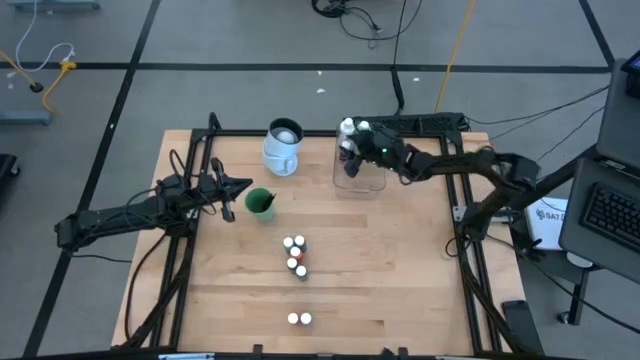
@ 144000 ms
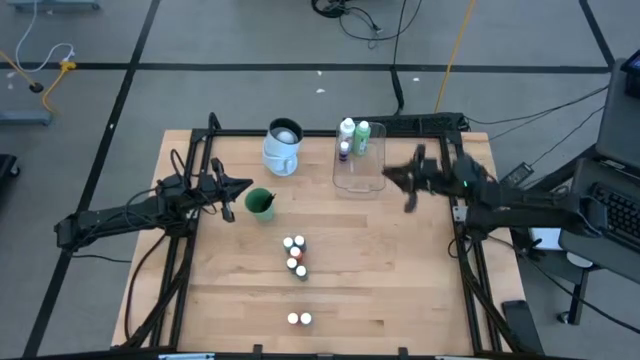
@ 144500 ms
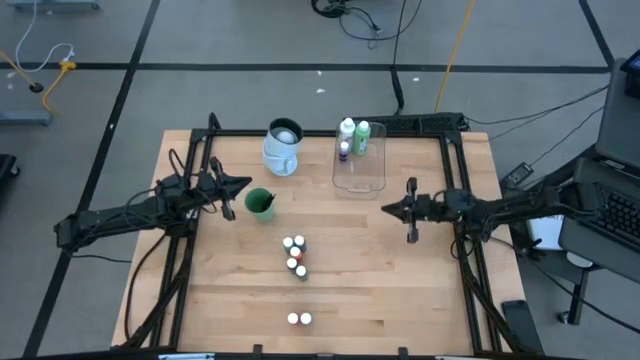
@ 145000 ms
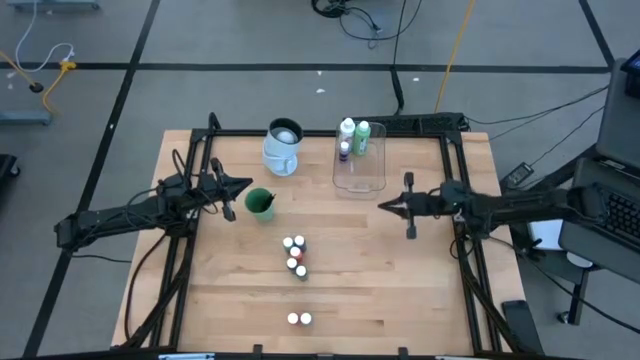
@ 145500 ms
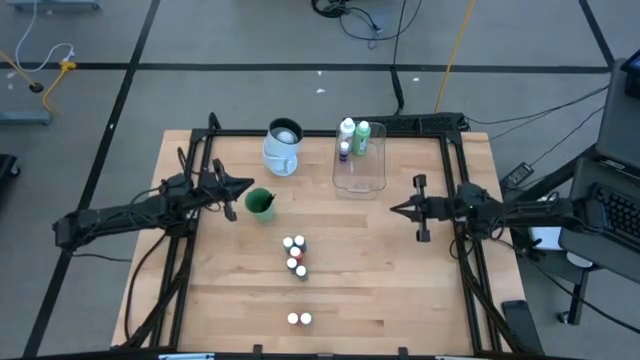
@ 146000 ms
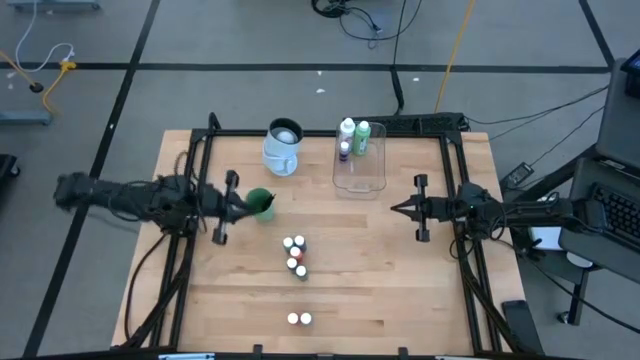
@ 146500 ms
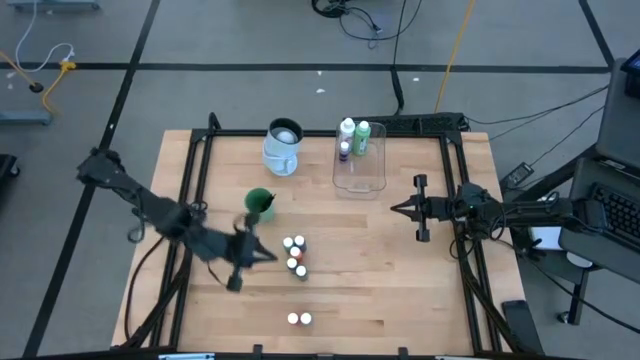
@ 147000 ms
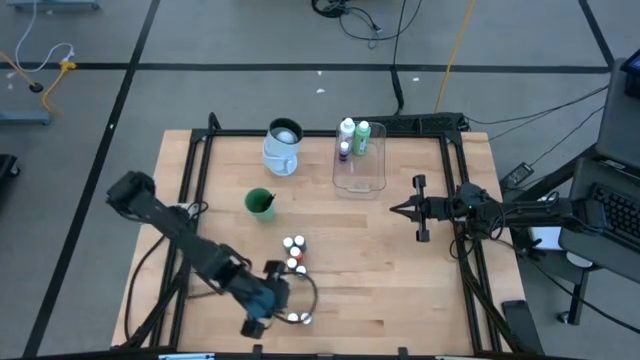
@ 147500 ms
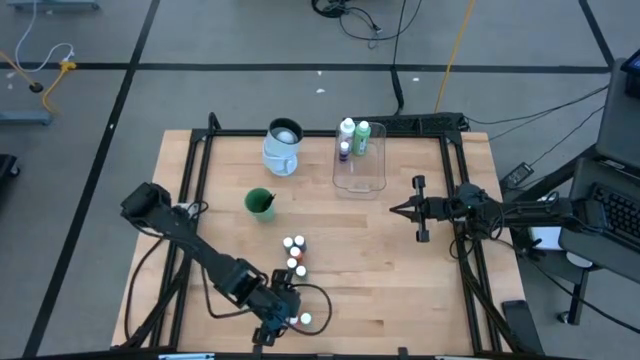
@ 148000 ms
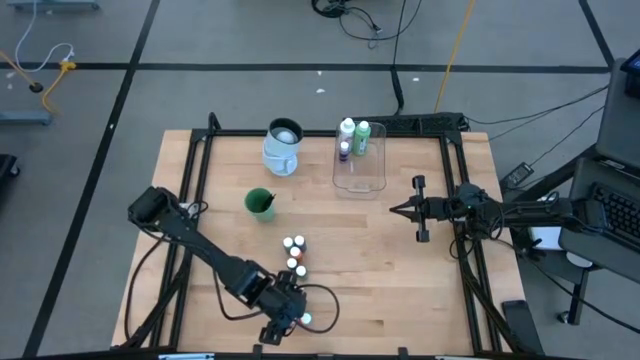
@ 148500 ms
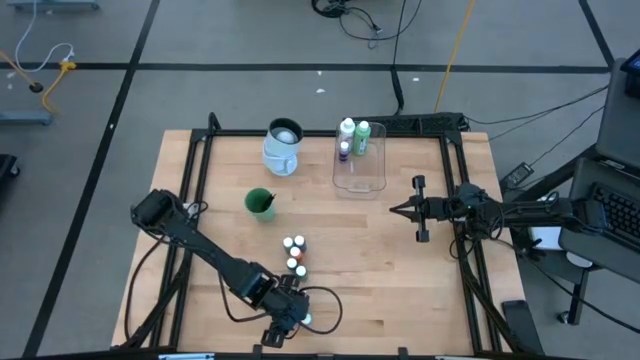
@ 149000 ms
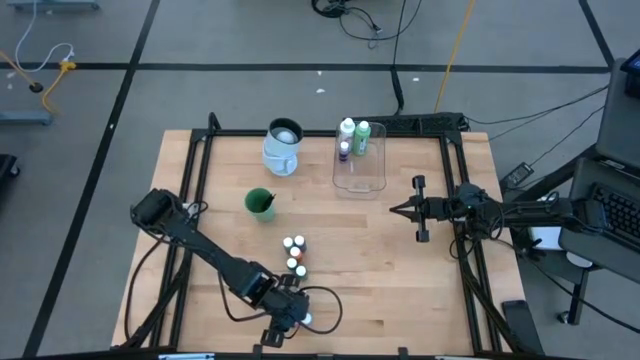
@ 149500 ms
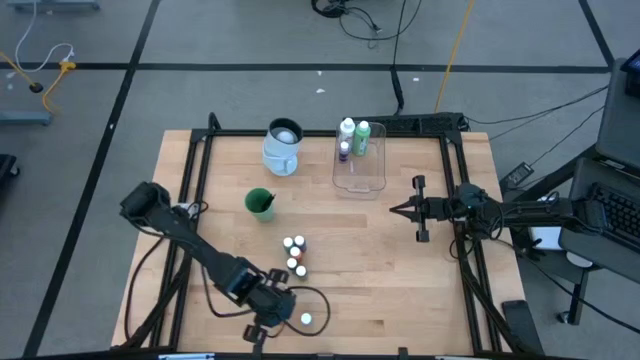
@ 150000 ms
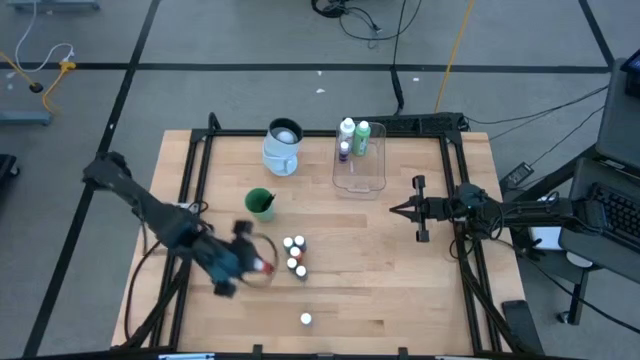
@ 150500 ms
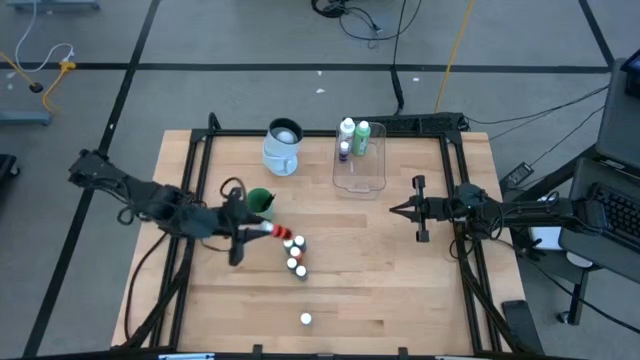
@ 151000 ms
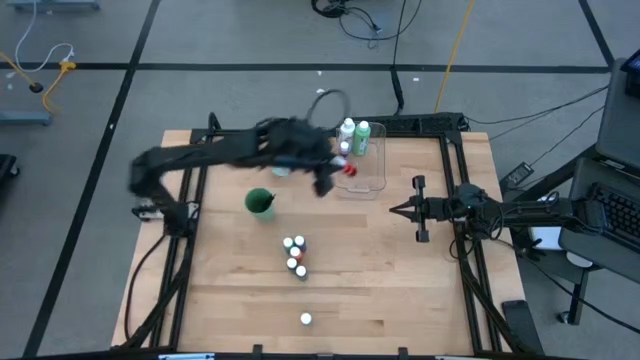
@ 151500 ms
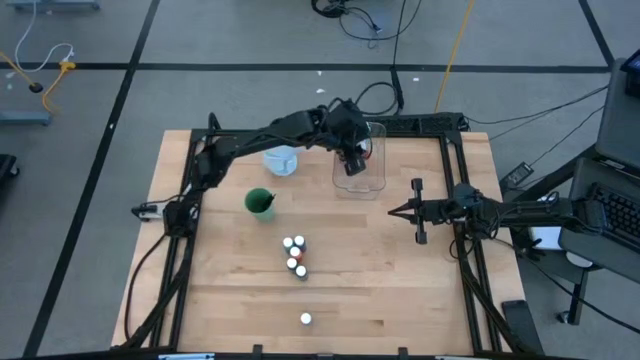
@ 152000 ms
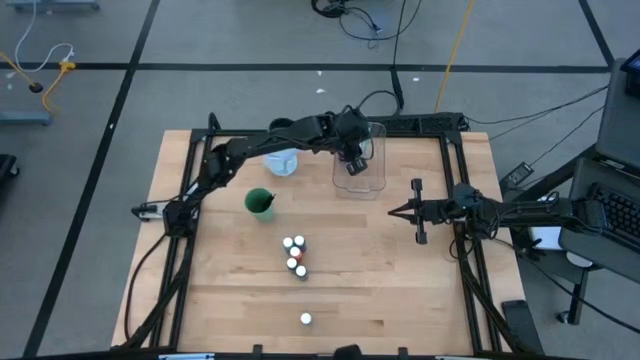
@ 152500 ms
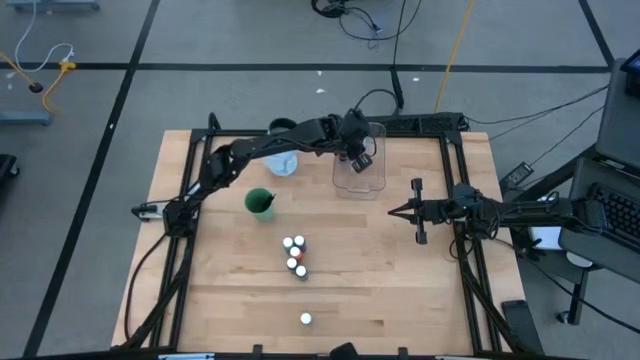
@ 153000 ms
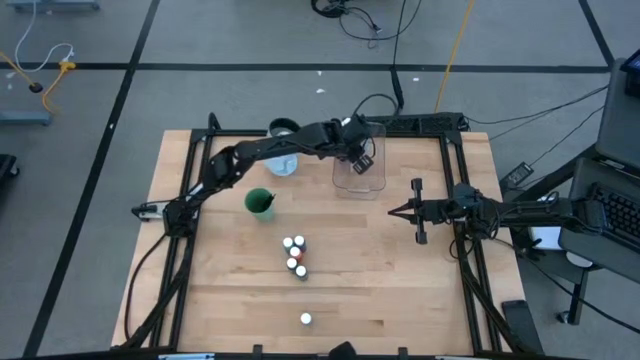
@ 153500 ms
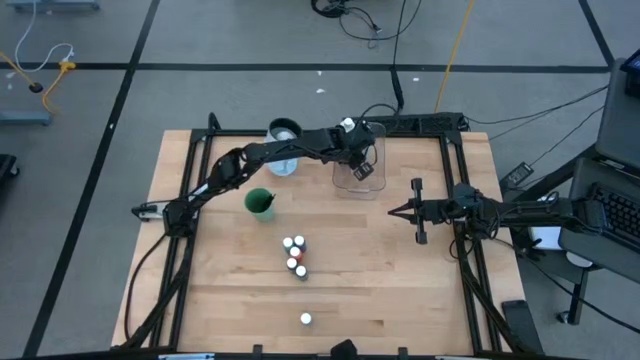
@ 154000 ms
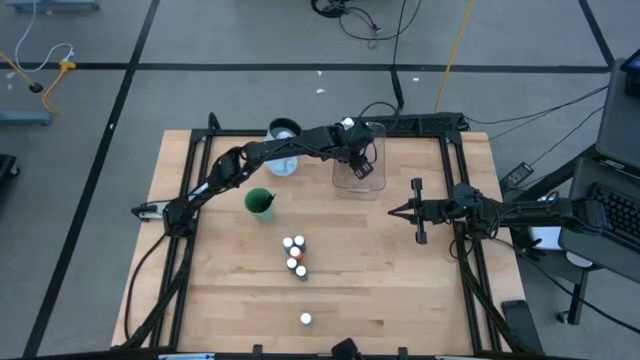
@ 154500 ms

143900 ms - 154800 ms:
Task: Pick & Place Paint Supplies
Put the red paint bottle into the transparent bin

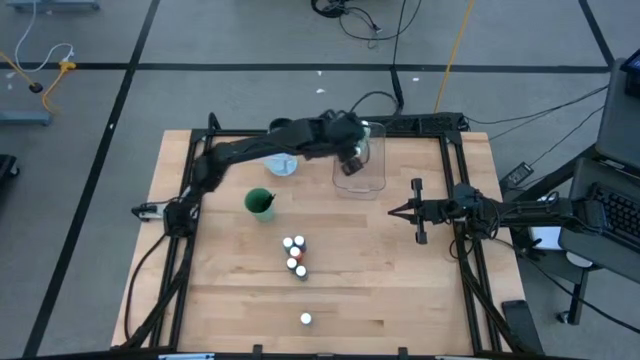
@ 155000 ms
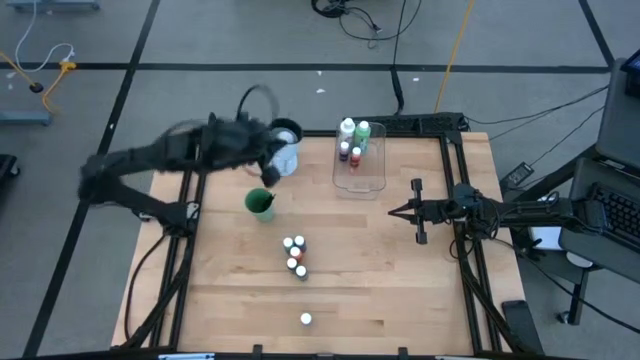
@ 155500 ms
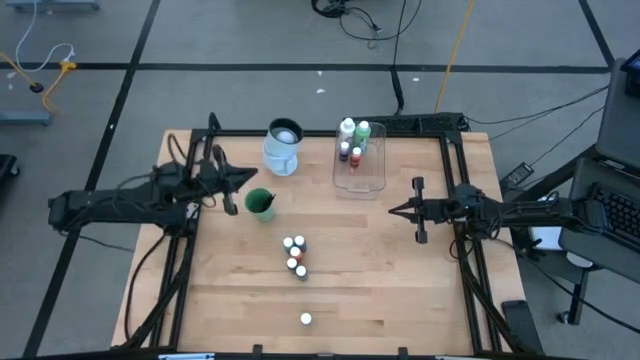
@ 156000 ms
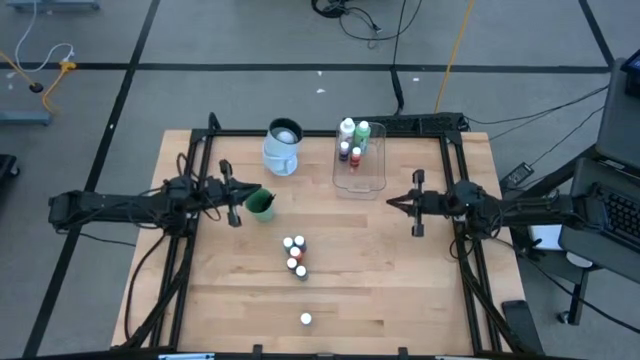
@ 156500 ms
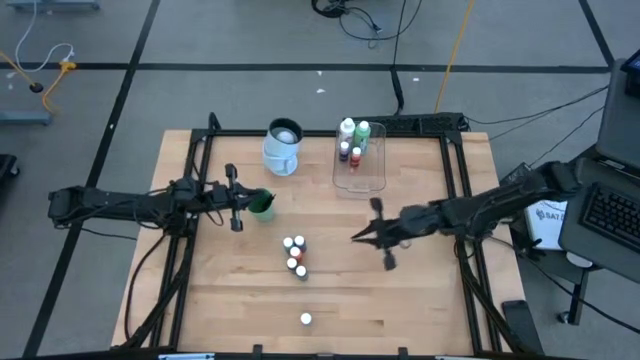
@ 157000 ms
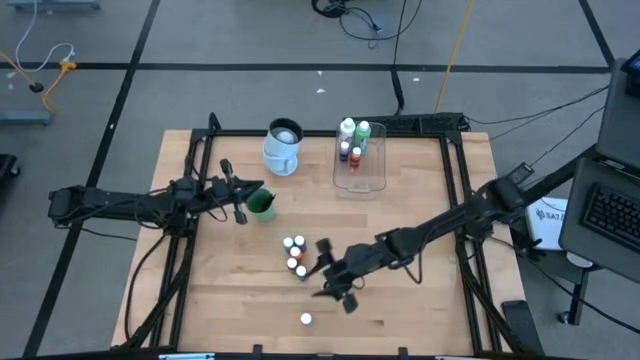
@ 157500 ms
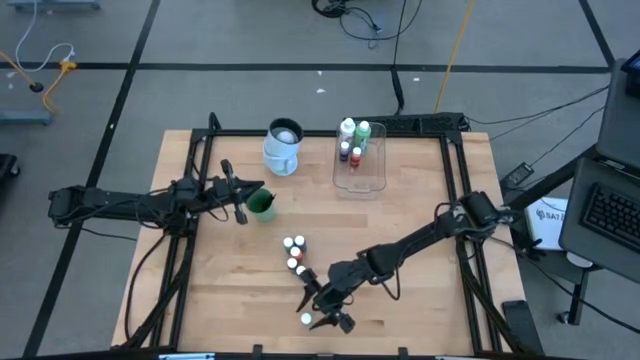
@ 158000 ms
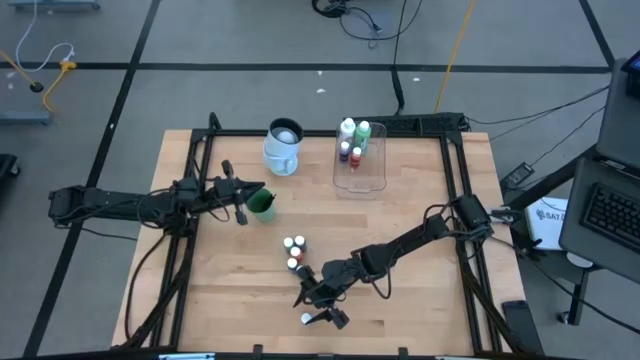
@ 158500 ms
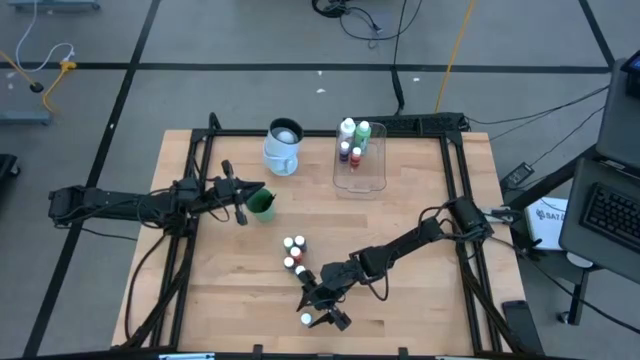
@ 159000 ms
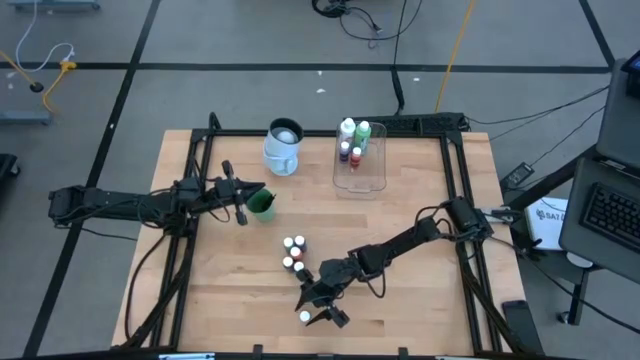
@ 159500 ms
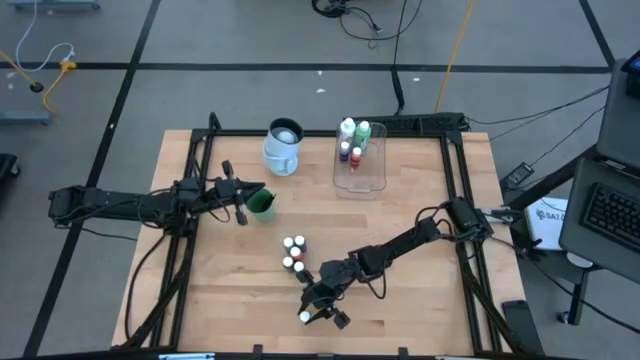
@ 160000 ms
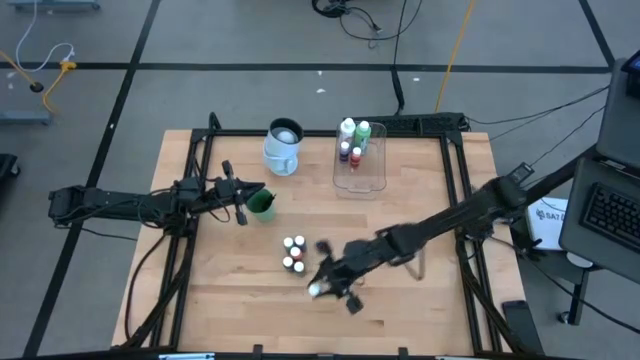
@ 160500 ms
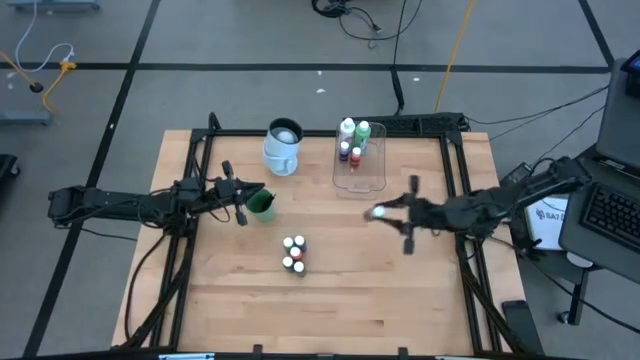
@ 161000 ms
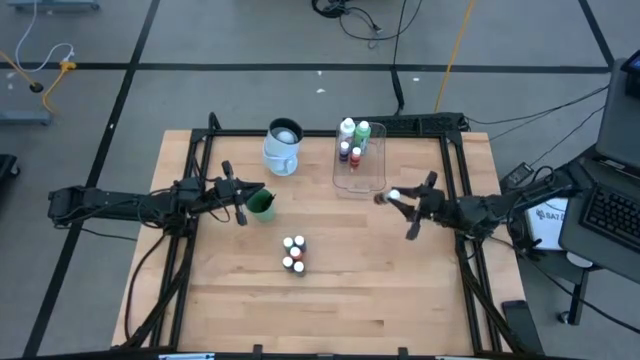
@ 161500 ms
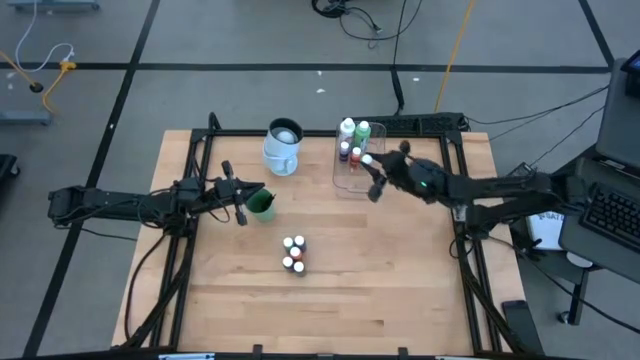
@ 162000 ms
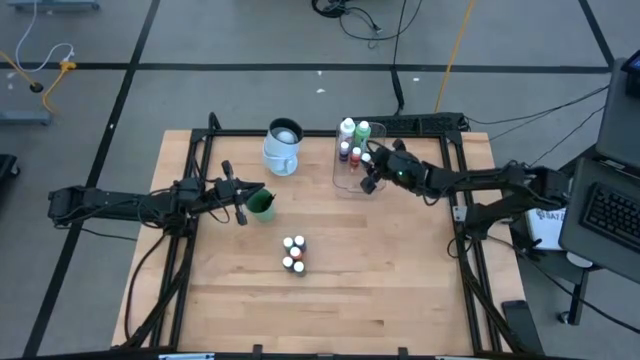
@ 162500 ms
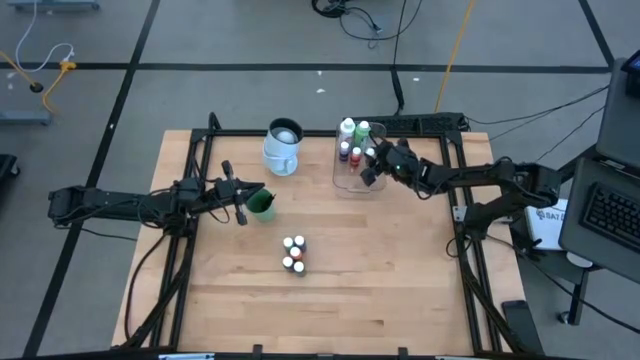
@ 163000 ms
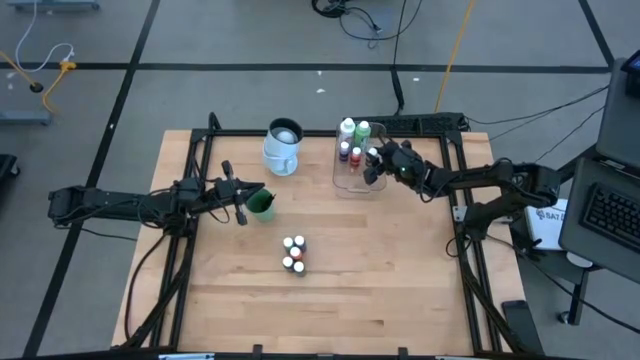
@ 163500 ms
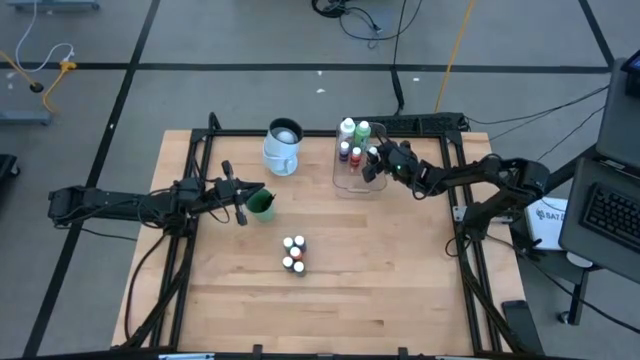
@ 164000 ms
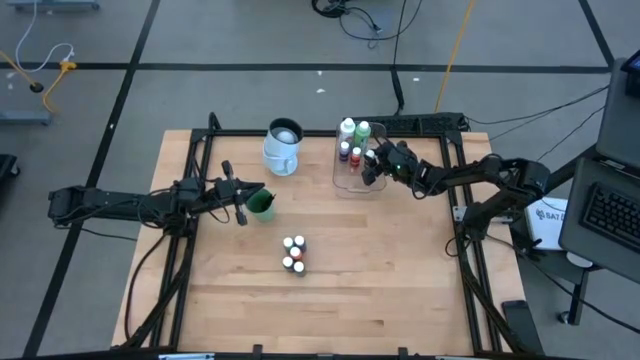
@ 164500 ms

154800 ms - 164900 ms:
Put the gray paint bottle into the transparent bin
